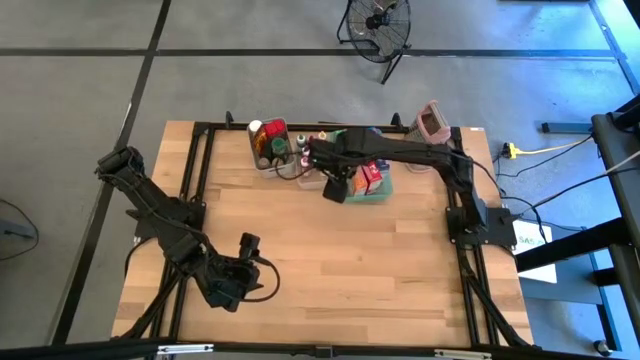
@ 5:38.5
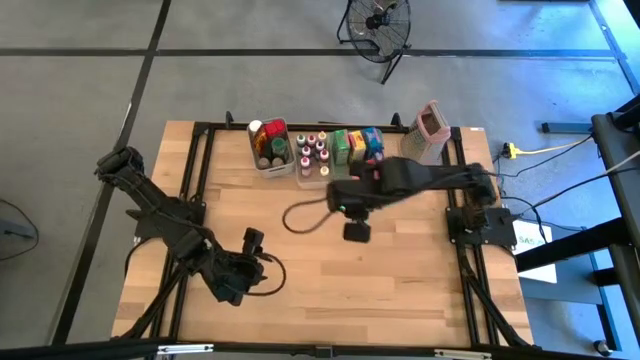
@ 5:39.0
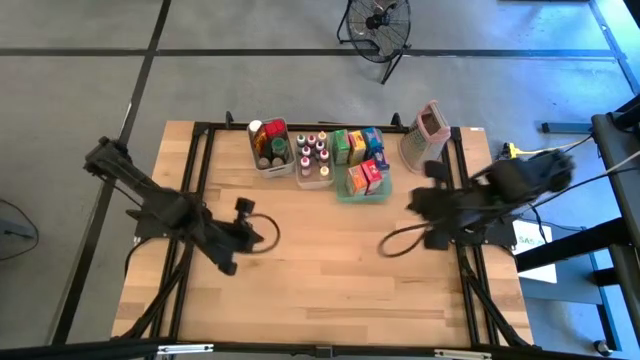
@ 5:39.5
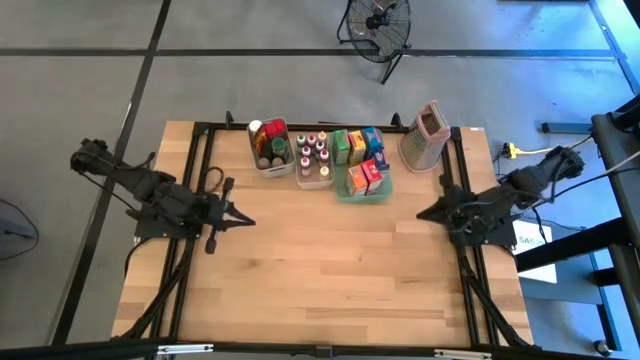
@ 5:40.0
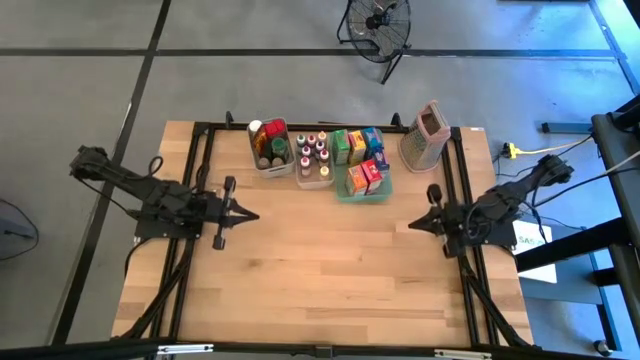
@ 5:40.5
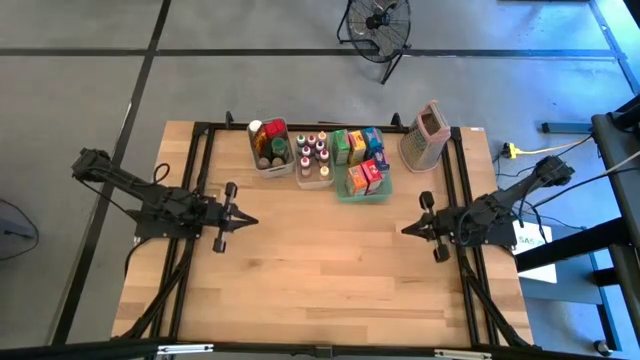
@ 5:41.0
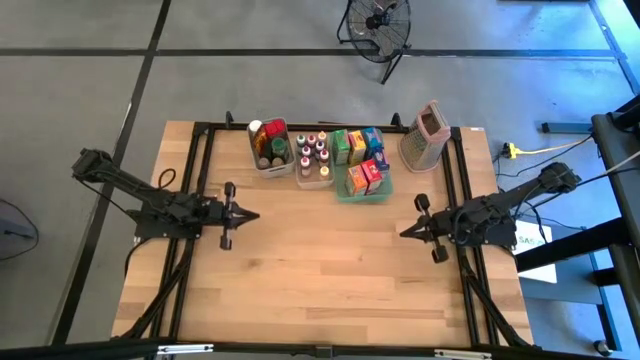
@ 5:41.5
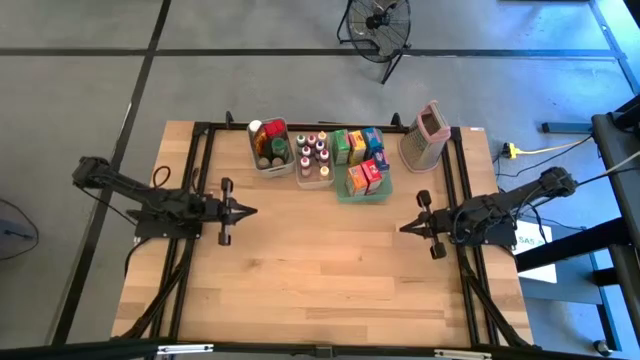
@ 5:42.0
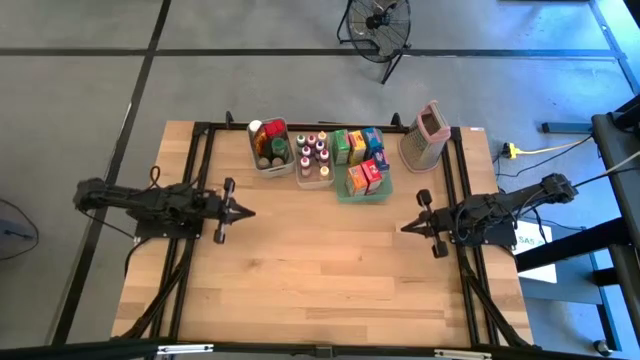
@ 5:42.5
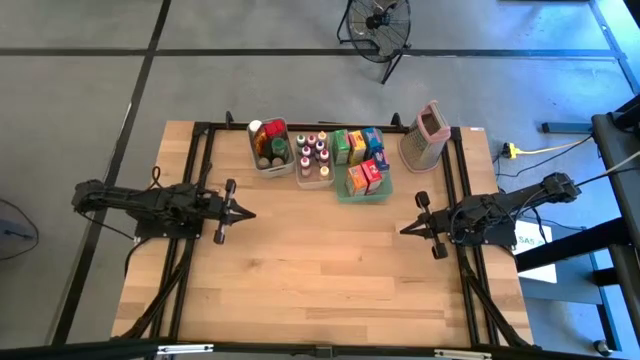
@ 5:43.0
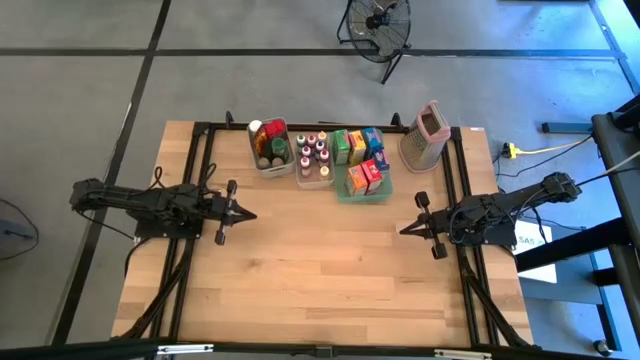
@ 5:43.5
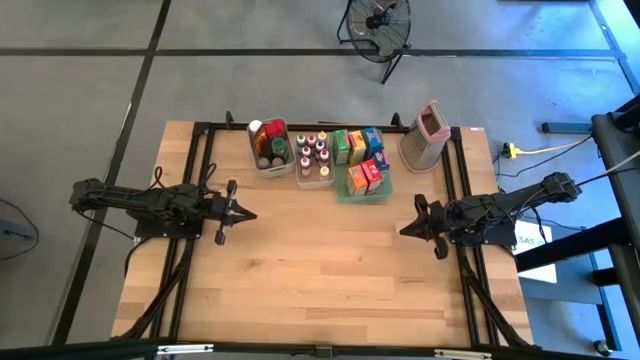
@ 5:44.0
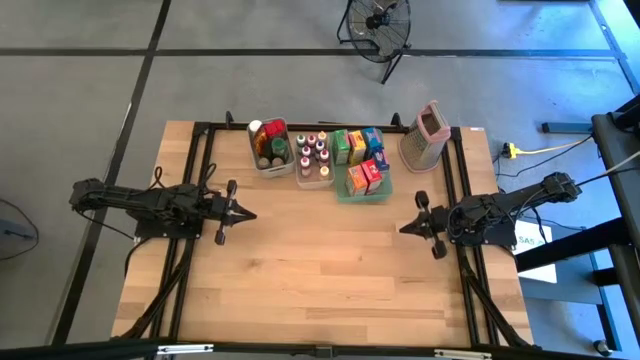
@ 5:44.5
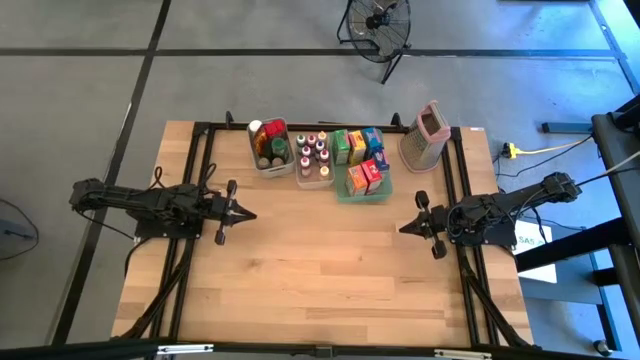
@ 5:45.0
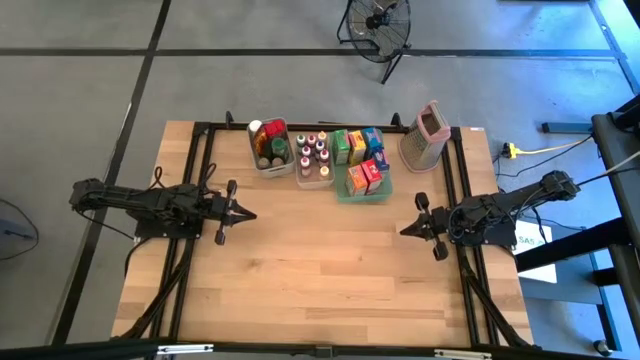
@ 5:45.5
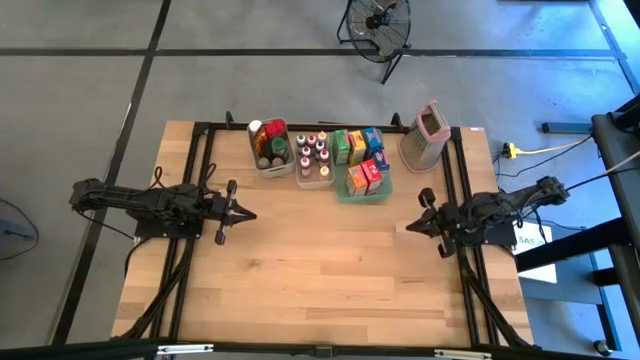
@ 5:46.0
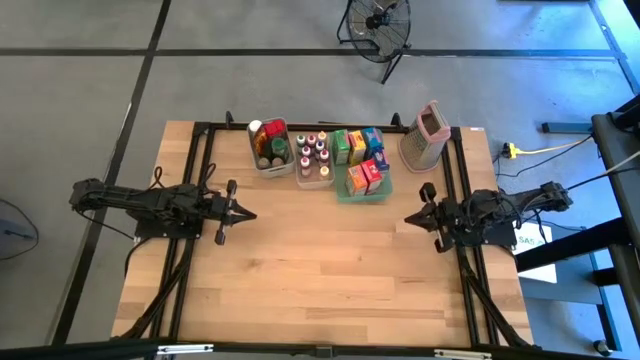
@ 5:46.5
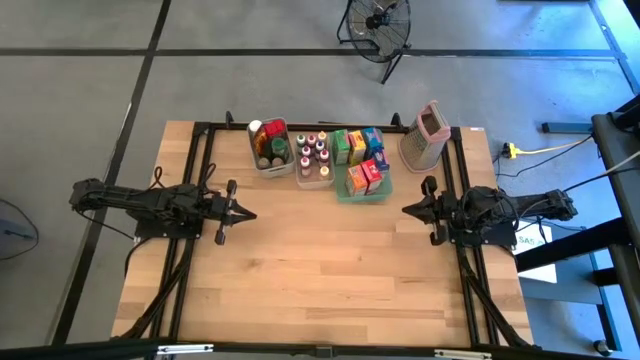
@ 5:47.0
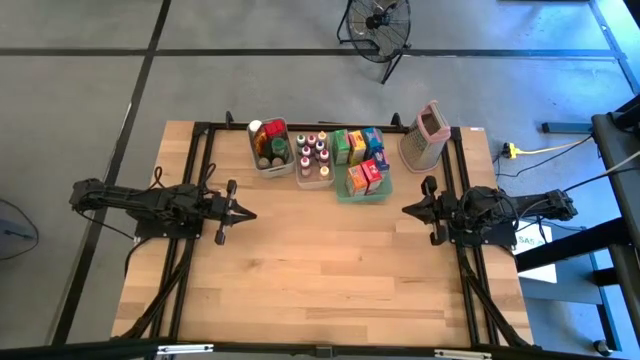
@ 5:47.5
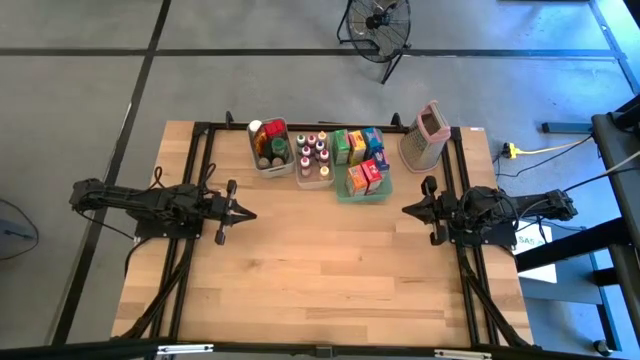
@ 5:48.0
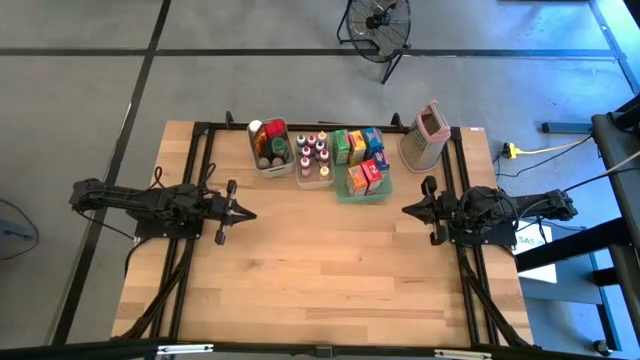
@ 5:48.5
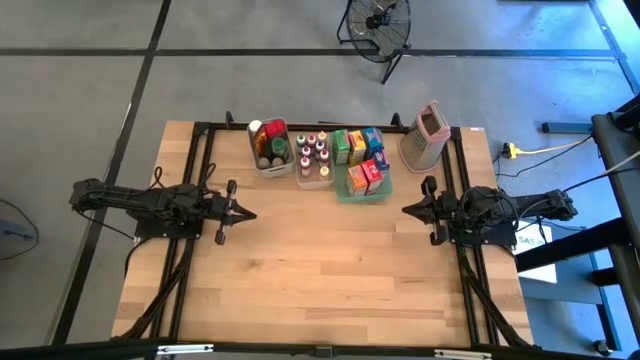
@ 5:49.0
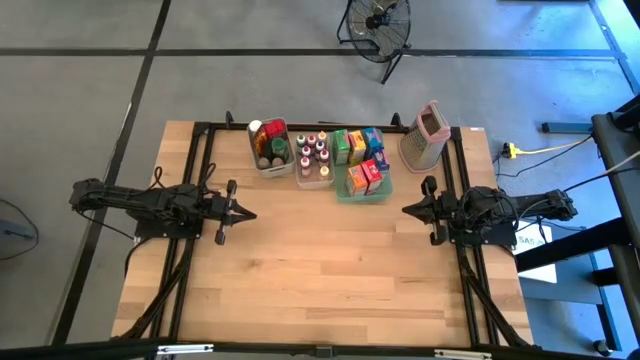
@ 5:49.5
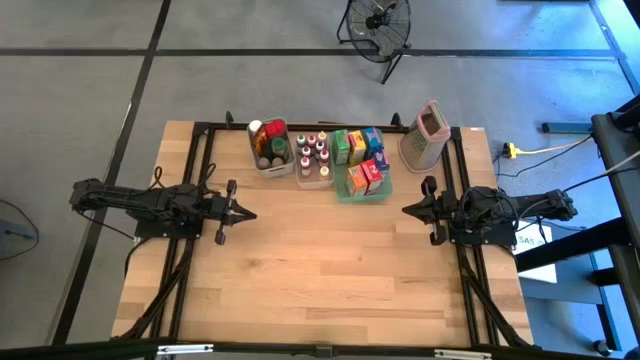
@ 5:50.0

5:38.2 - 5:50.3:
Task: Pick & Place Kitchen Items
Return to Home Position

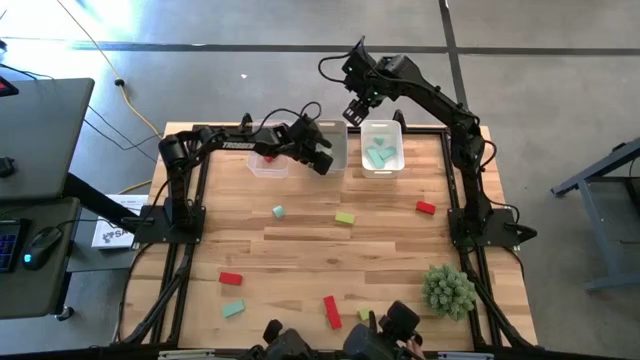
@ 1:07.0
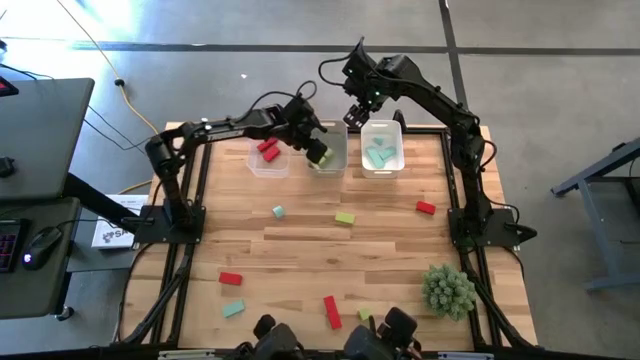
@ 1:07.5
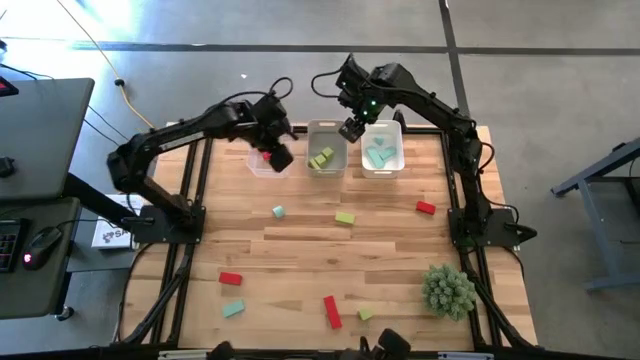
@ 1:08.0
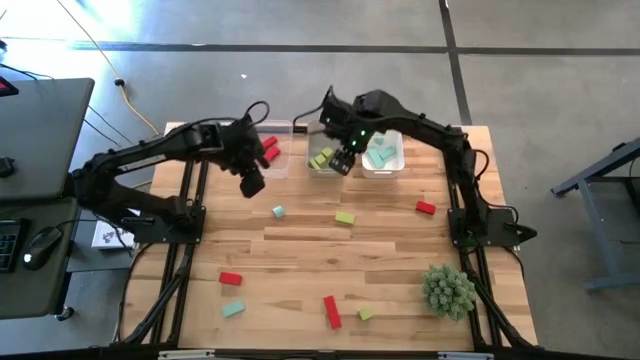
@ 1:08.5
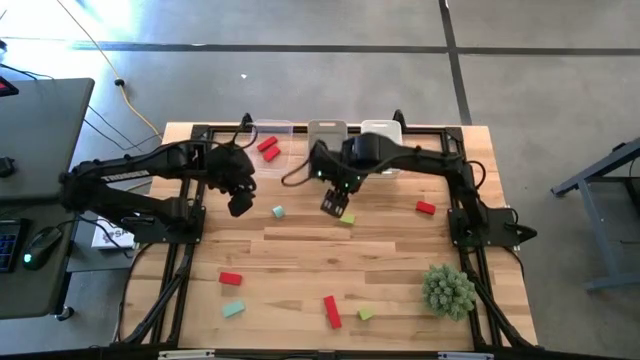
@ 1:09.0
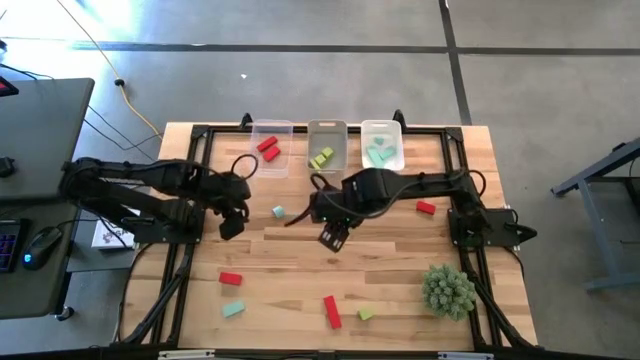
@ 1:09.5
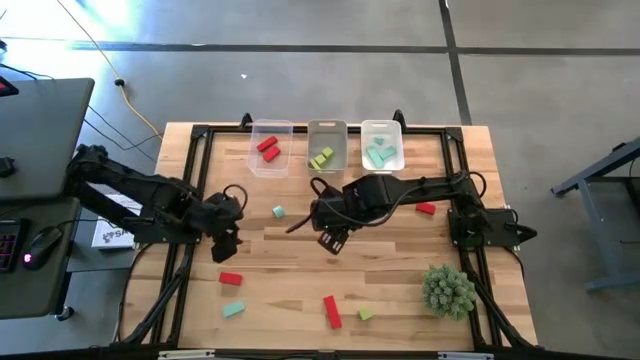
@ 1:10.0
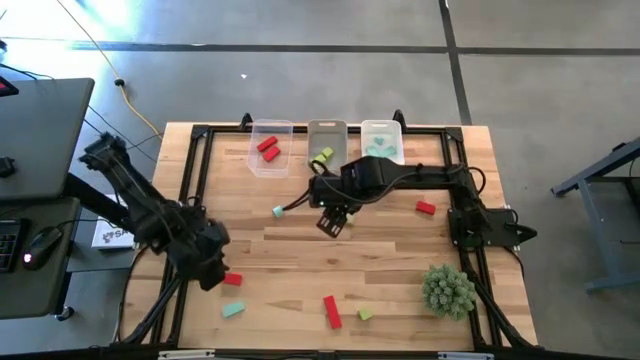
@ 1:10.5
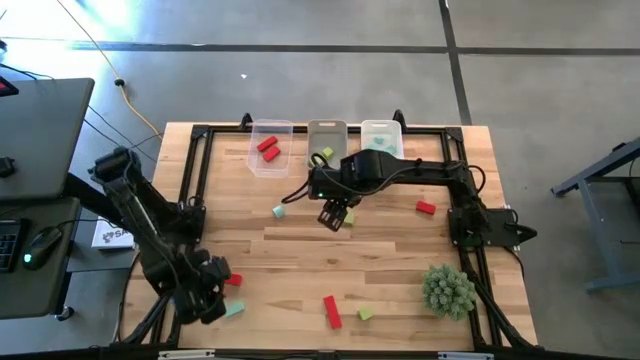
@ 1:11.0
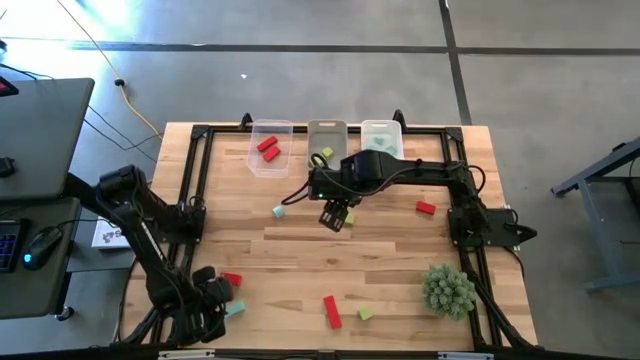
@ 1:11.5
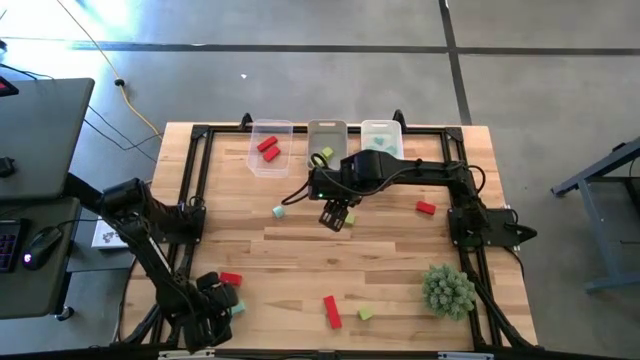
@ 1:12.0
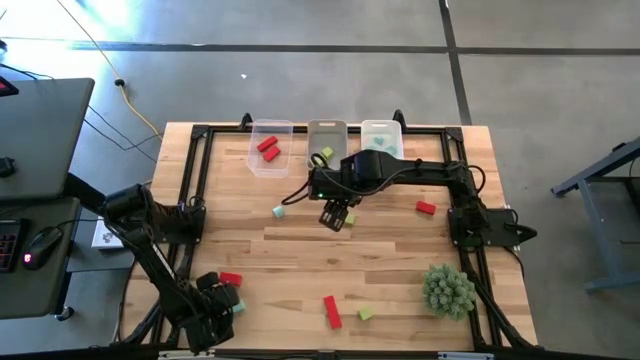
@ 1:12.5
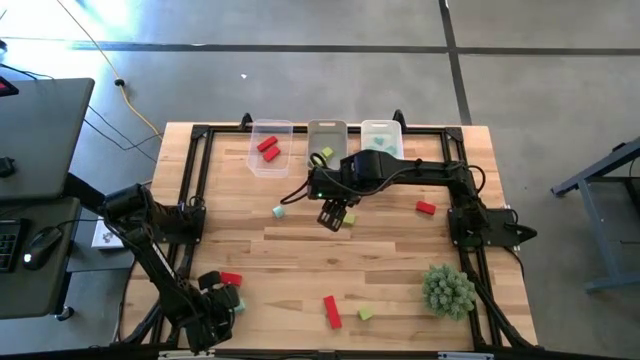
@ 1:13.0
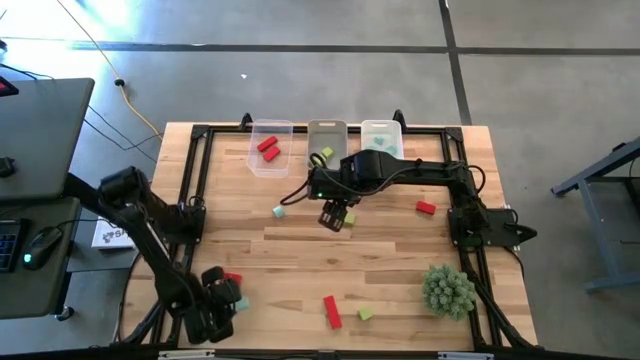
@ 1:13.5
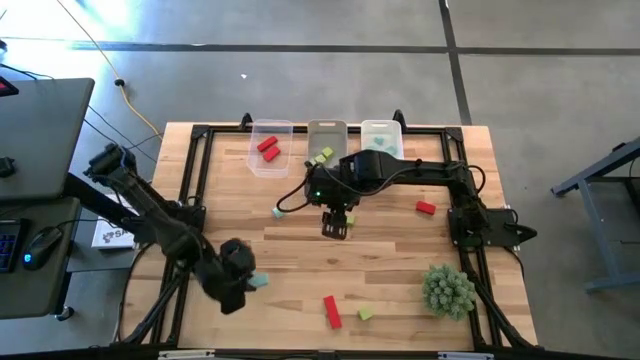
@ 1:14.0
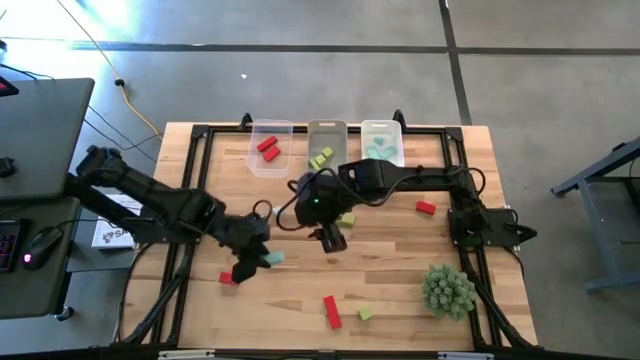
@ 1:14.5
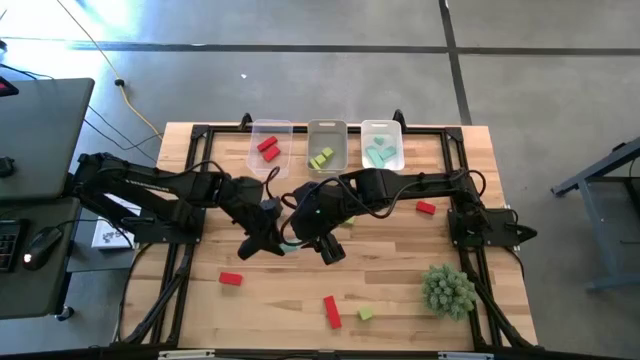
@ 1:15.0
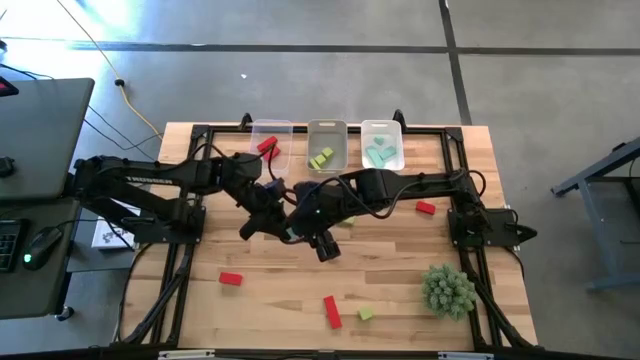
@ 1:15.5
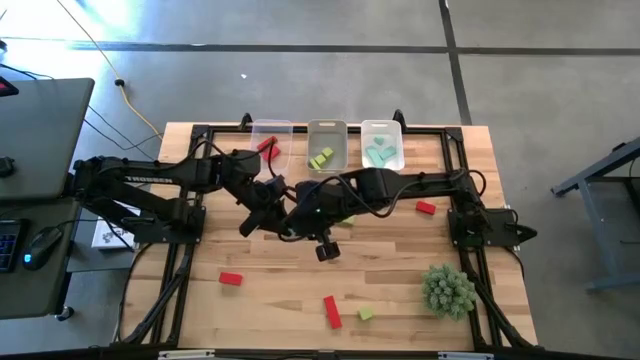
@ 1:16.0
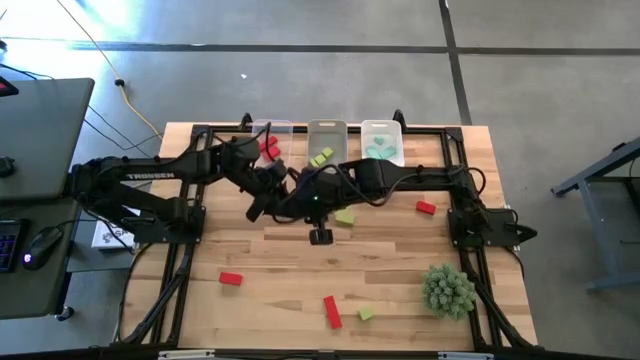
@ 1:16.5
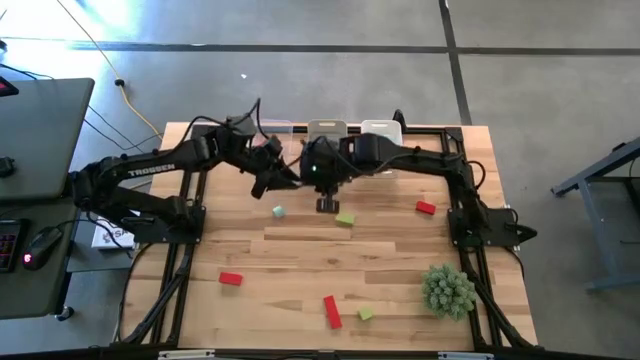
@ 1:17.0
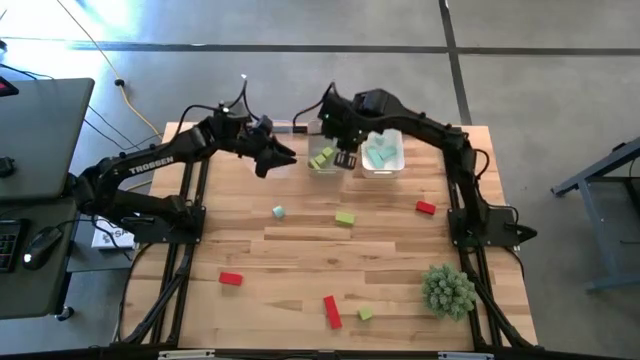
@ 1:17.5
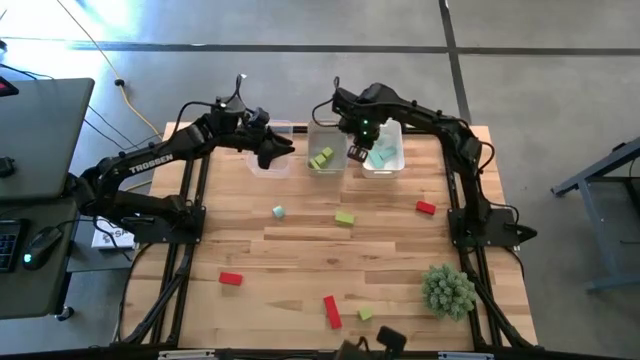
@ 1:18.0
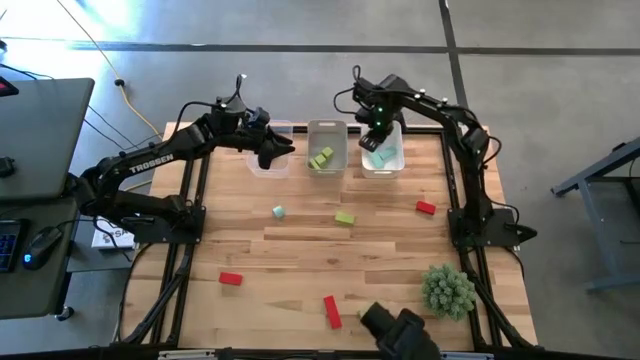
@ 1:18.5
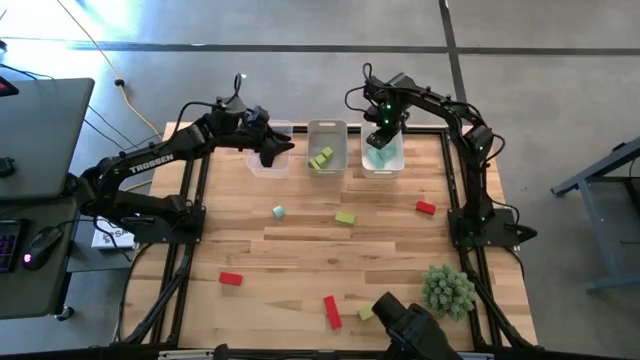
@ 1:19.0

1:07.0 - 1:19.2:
Task: Sort & place blocks by color
Put the blue block into the white bin
